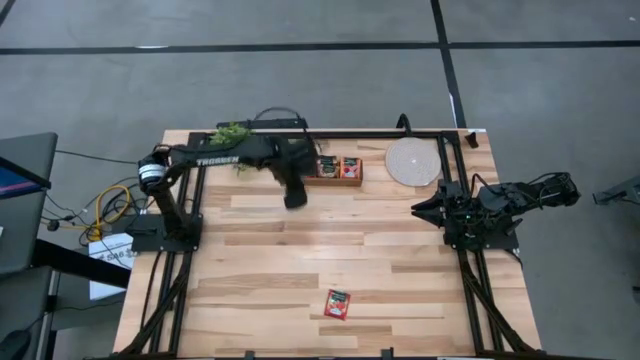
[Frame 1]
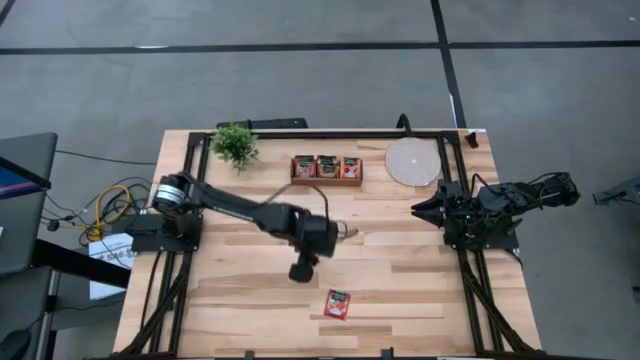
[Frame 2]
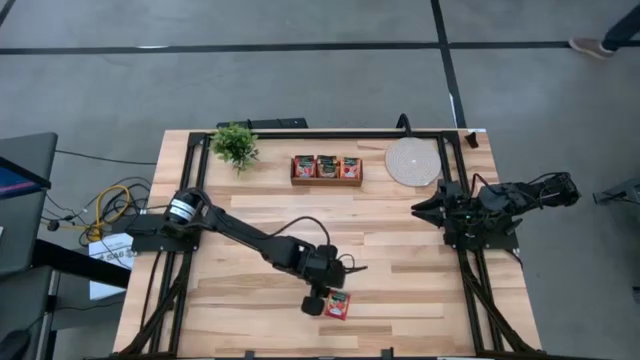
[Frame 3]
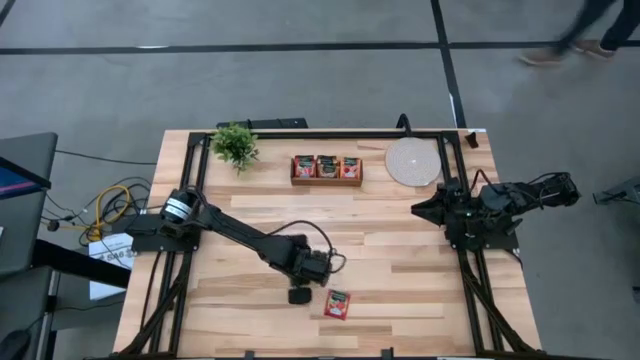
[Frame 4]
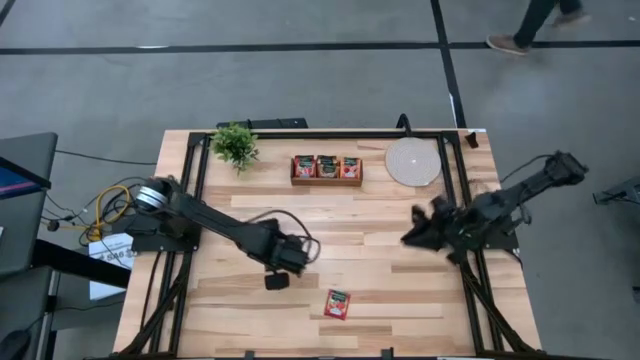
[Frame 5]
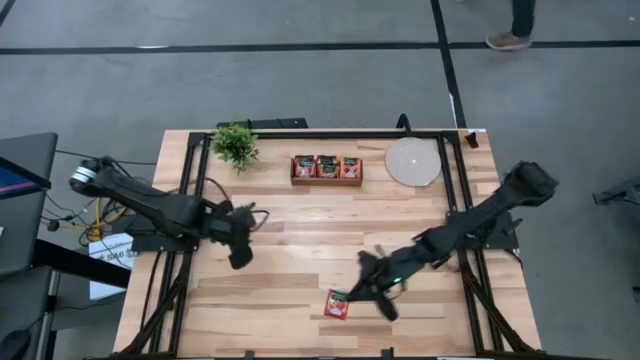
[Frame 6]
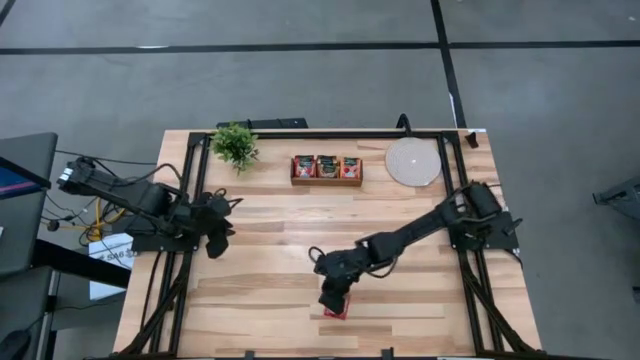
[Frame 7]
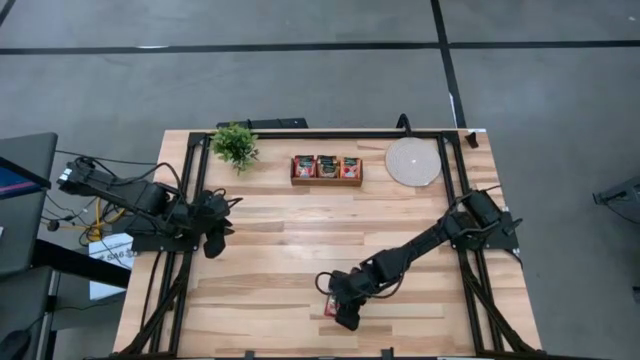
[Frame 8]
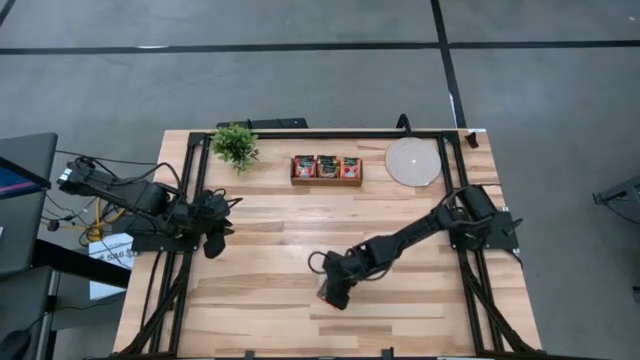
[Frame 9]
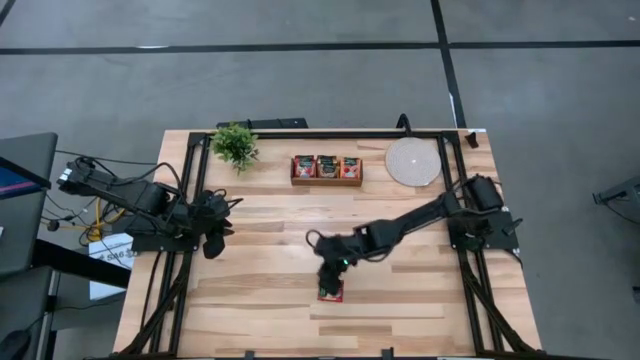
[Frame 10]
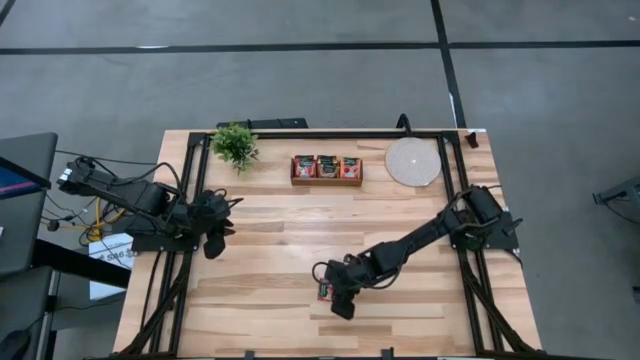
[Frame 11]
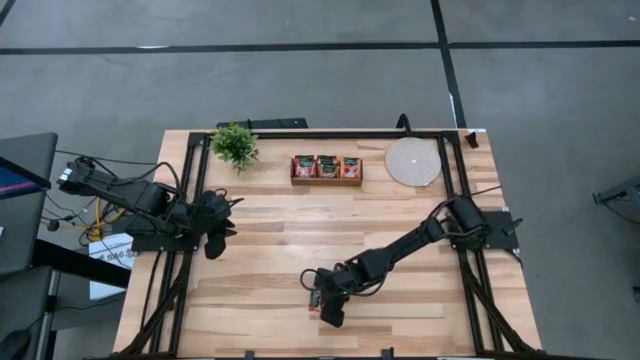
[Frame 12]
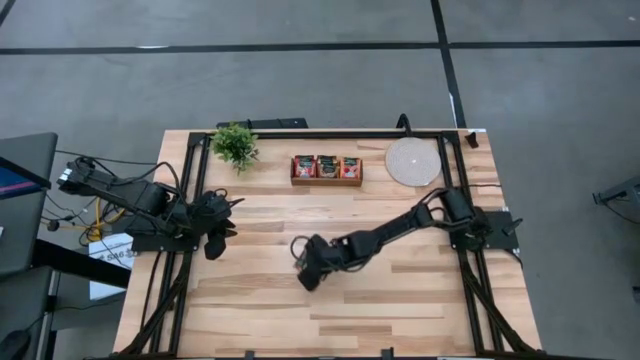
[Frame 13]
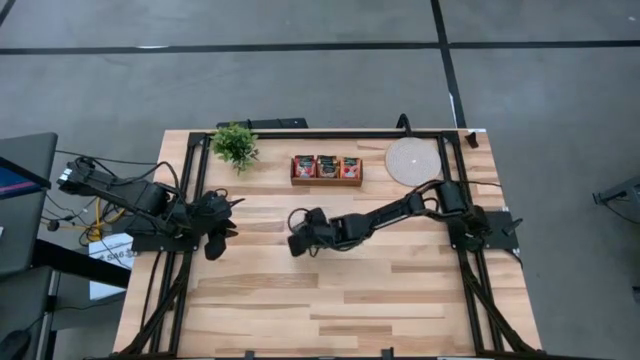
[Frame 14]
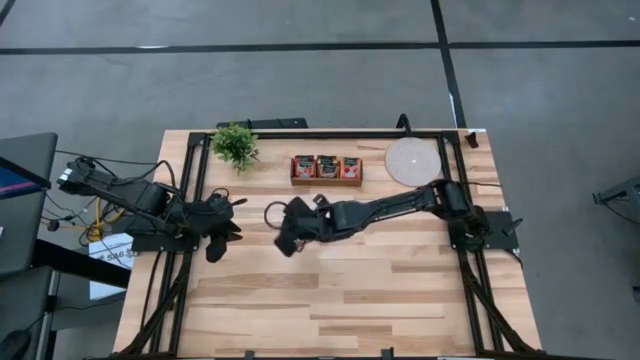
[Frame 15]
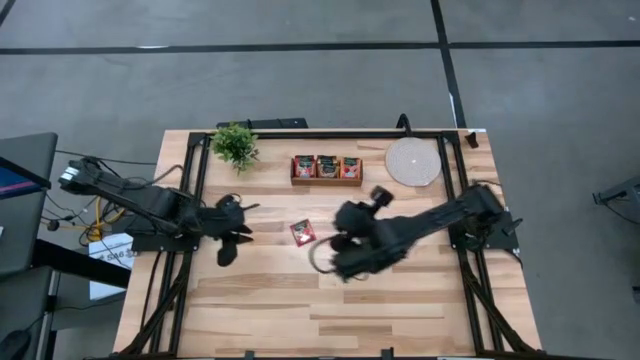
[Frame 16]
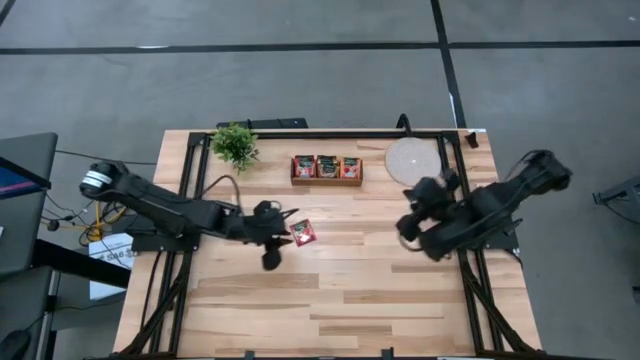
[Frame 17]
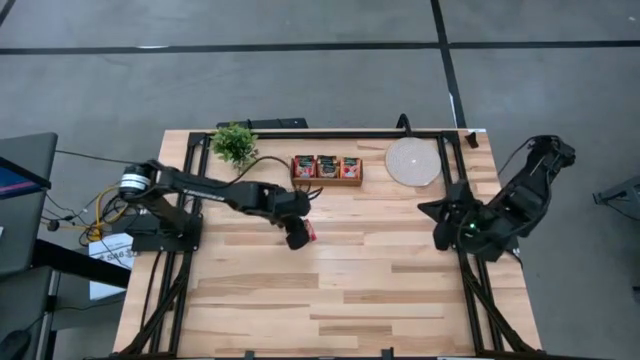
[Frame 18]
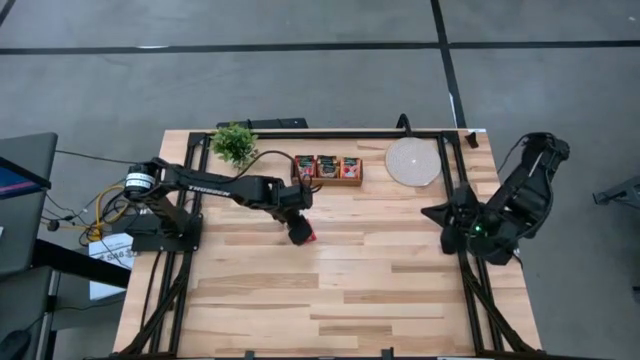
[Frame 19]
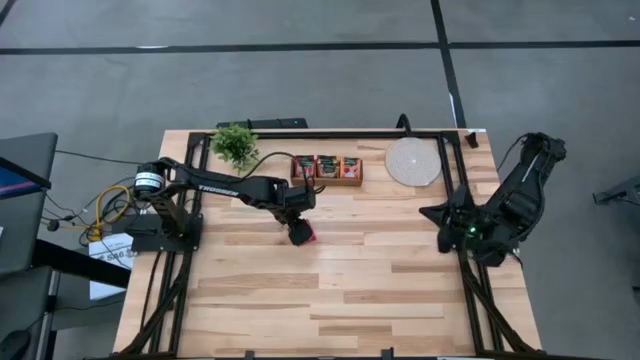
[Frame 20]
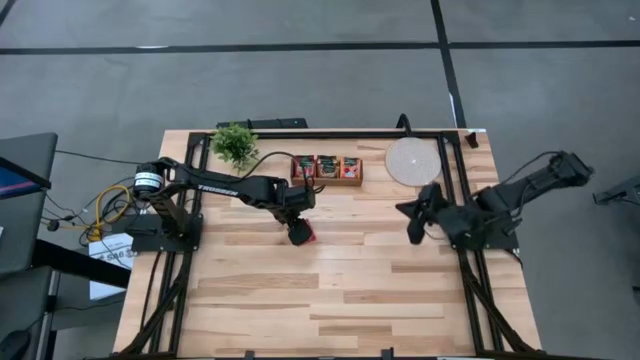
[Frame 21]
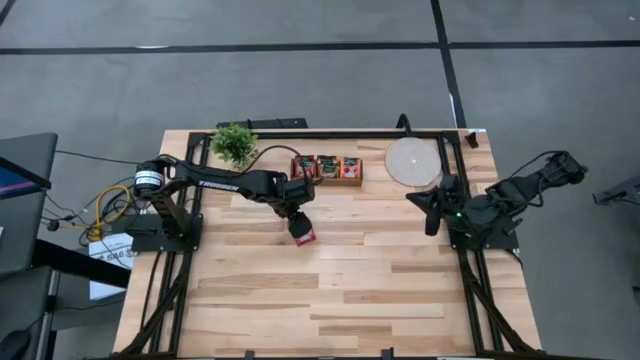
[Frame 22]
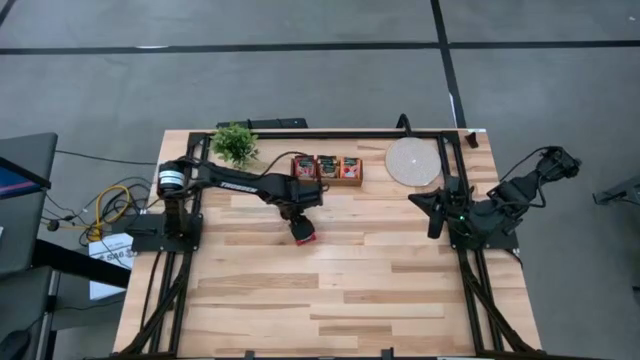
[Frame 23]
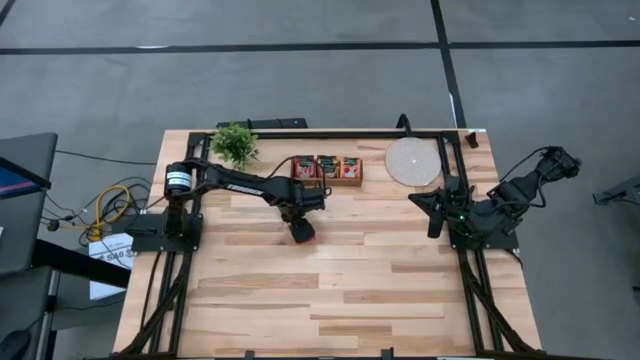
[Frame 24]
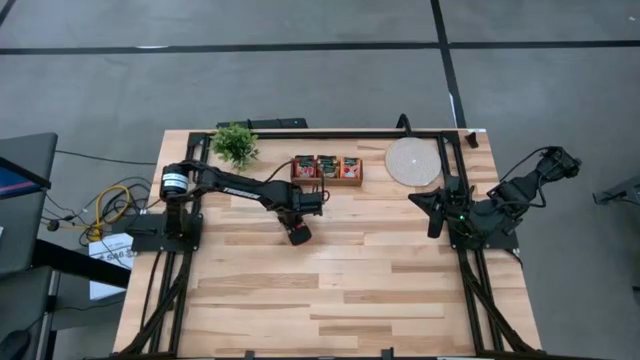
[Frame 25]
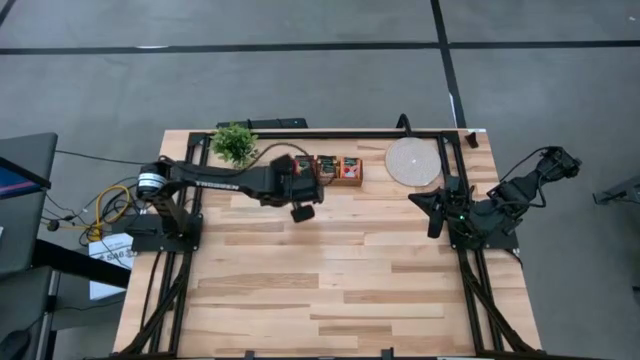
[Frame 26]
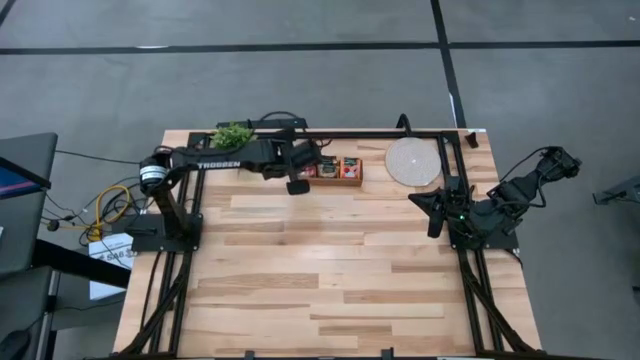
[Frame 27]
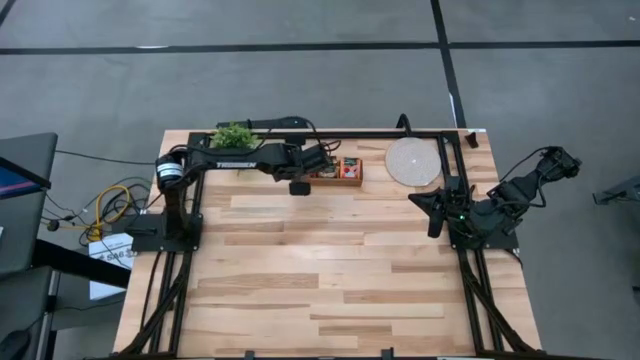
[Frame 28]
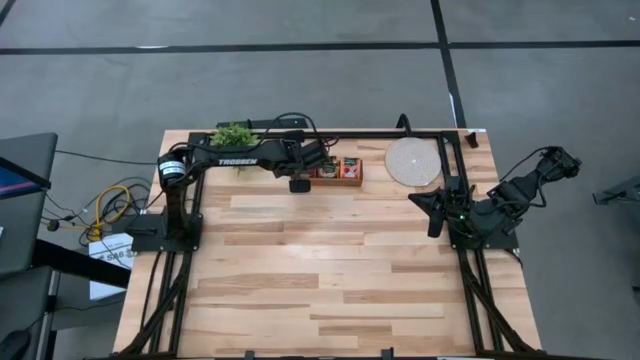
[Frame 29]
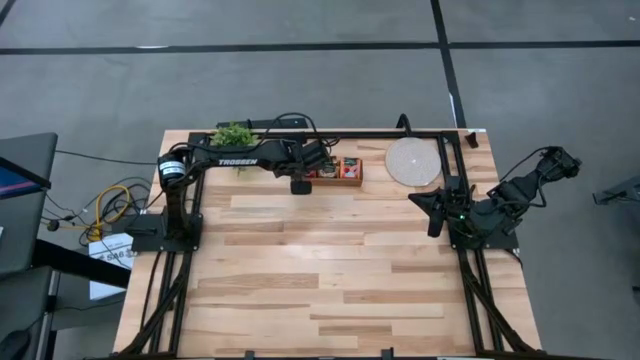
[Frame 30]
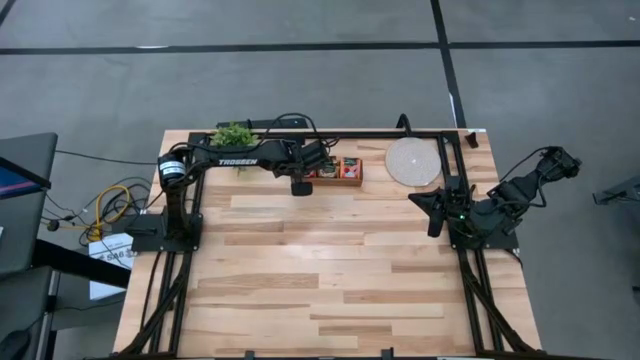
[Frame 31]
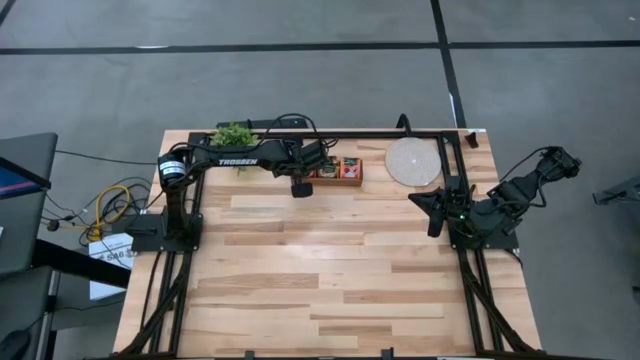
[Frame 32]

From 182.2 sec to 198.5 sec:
Task: Pick & Place Tea
Put the red tea bag into the left section of the wooden organizer

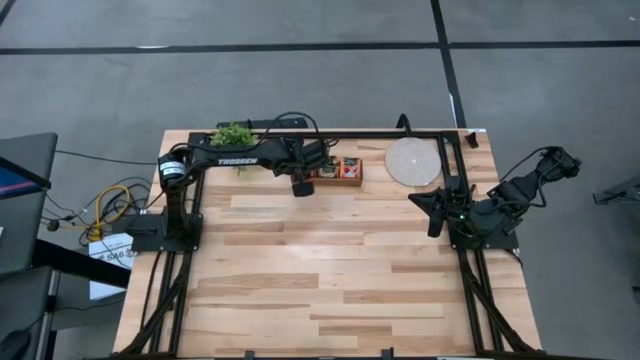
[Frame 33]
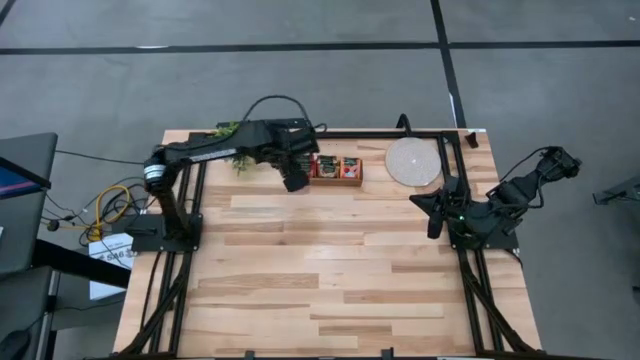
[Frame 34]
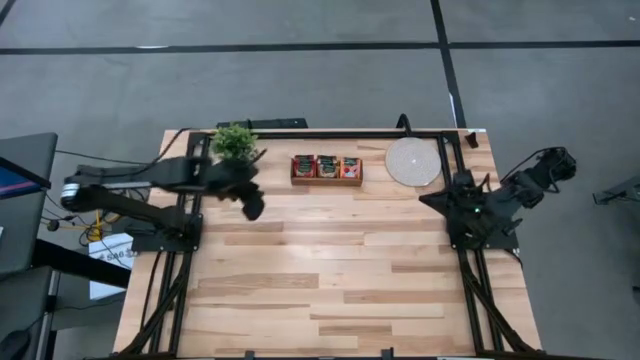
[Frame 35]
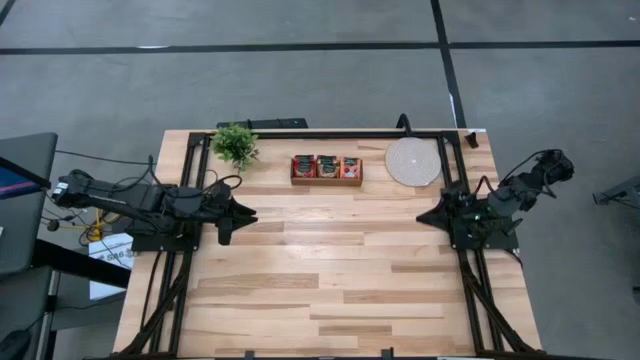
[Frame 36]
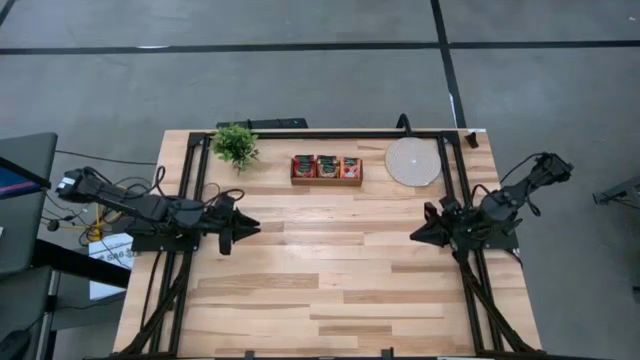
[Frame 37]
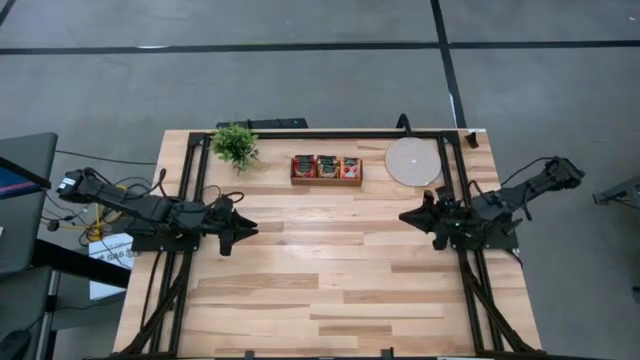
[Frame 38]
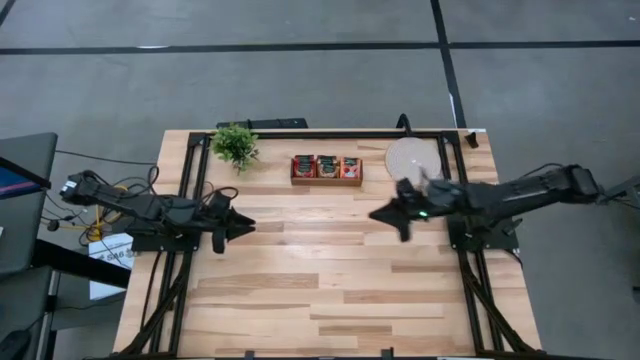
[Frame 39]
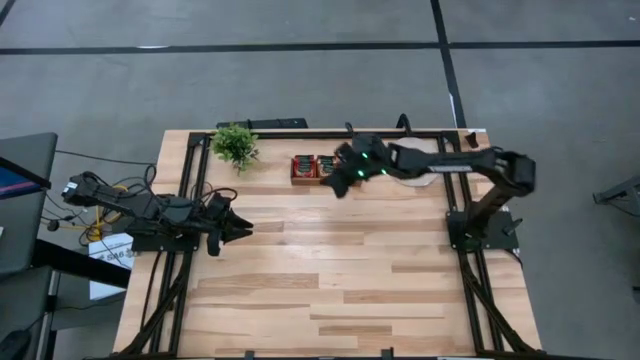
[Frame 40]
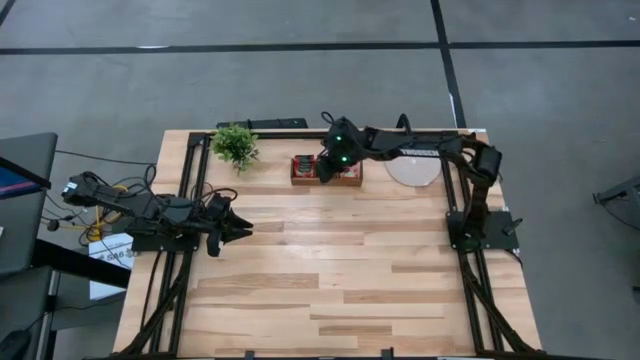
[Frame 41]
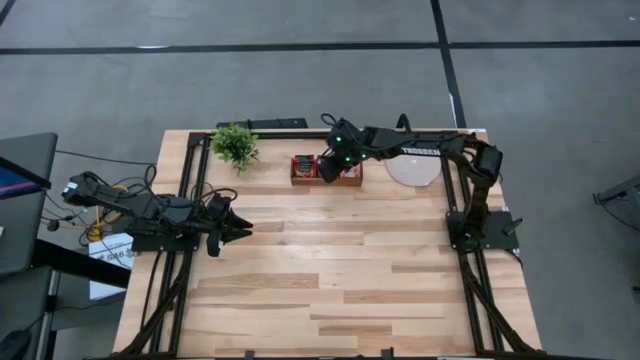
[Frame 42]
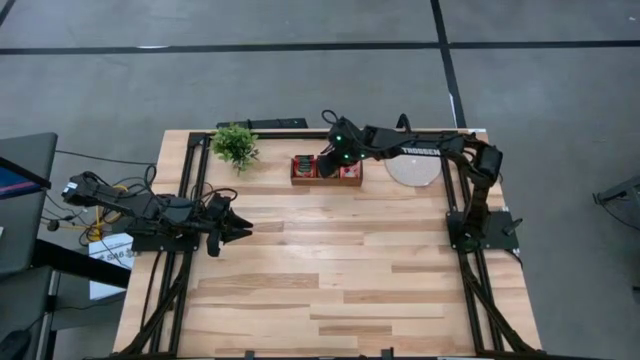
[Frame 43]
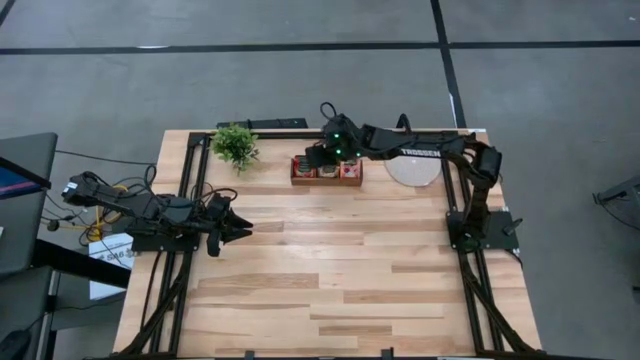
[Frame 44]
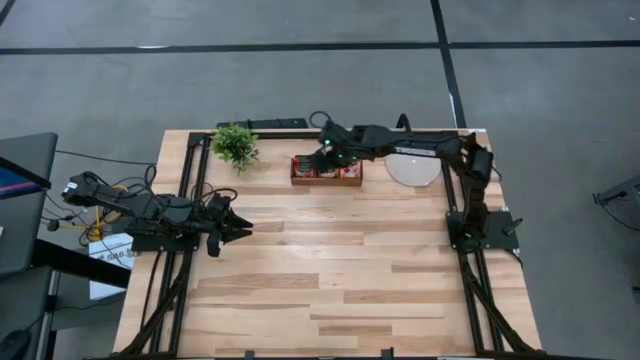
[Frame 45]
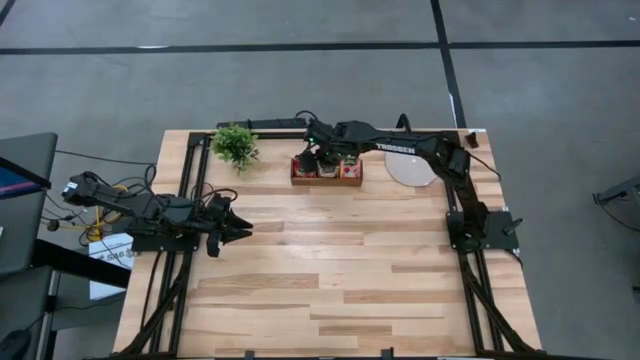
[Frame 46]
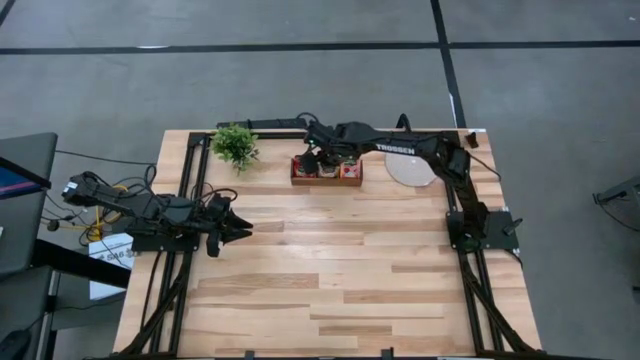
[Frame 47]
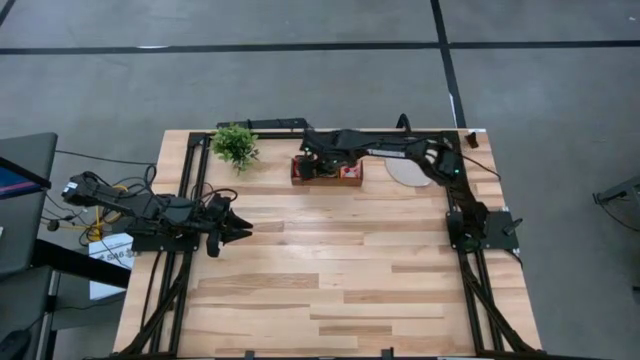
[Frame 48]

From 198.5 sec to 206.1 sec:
Adjust the brown tea bags
